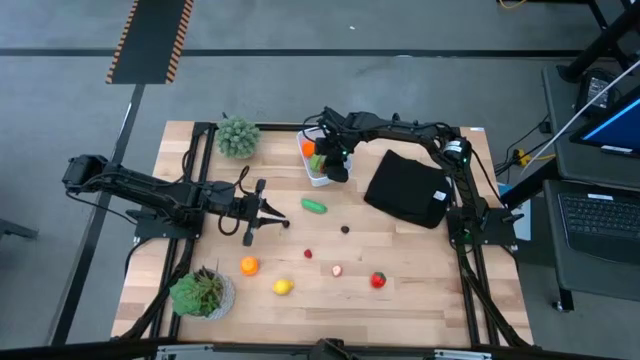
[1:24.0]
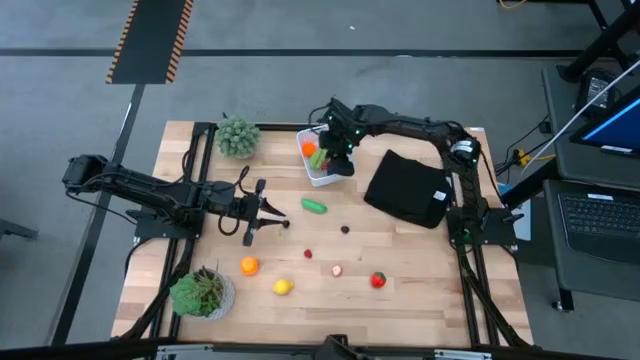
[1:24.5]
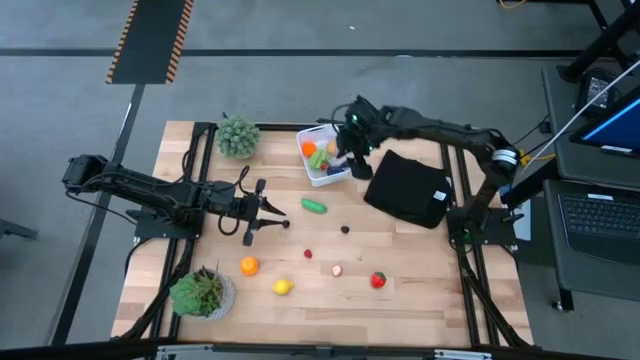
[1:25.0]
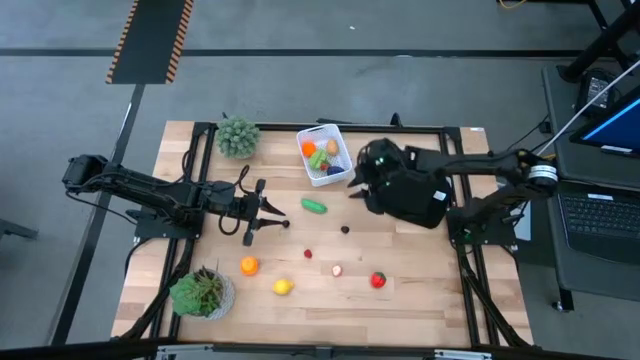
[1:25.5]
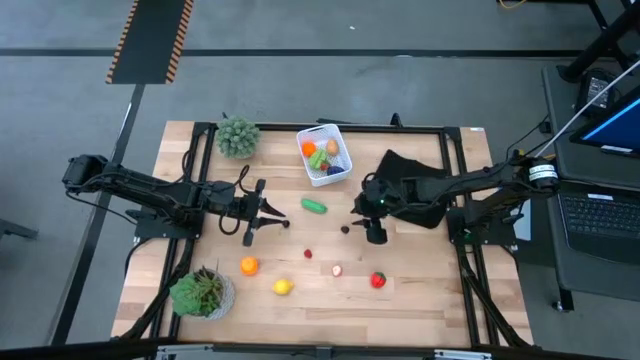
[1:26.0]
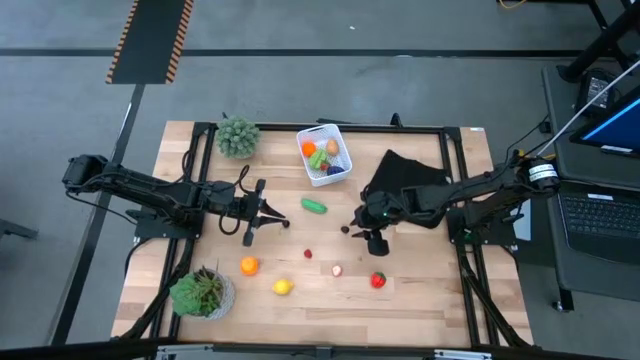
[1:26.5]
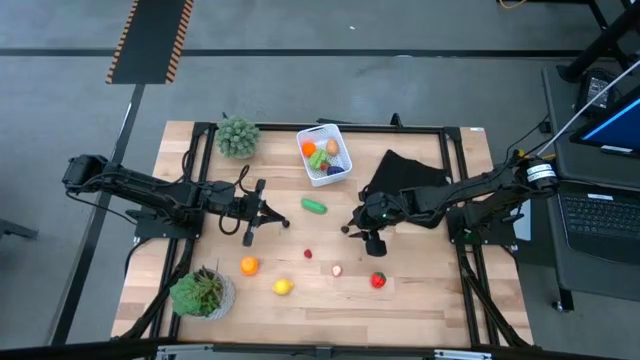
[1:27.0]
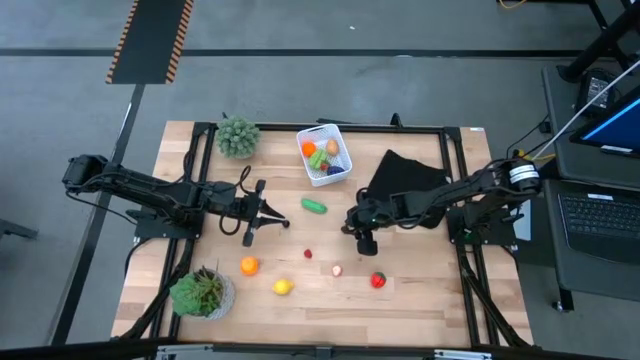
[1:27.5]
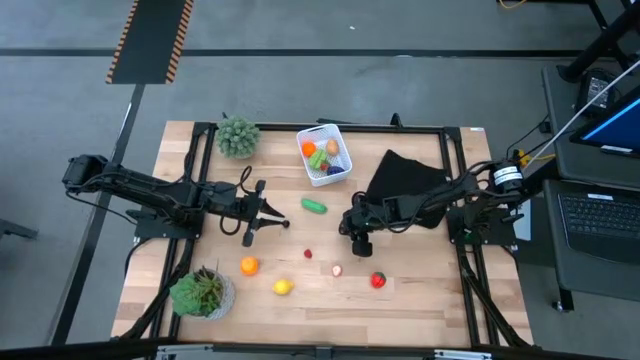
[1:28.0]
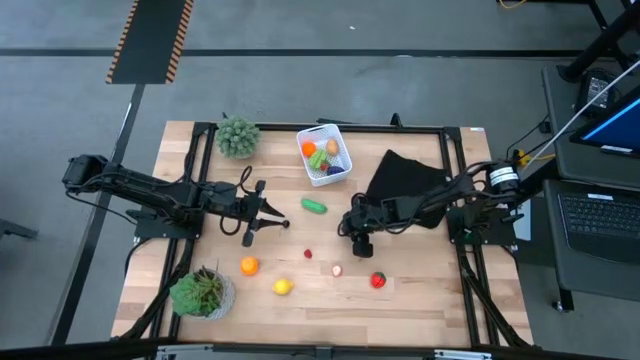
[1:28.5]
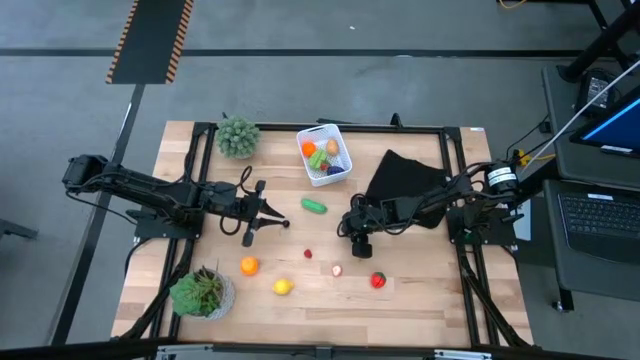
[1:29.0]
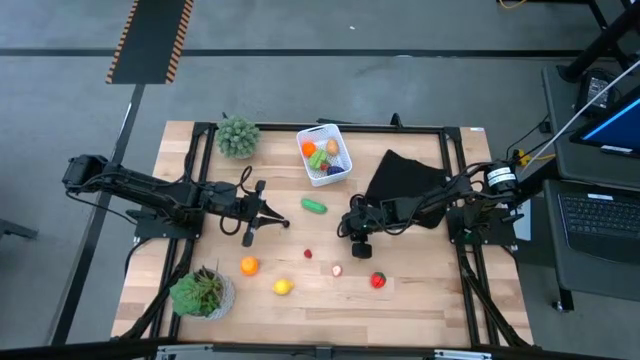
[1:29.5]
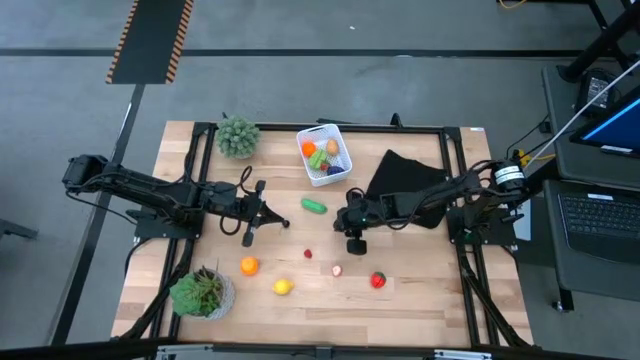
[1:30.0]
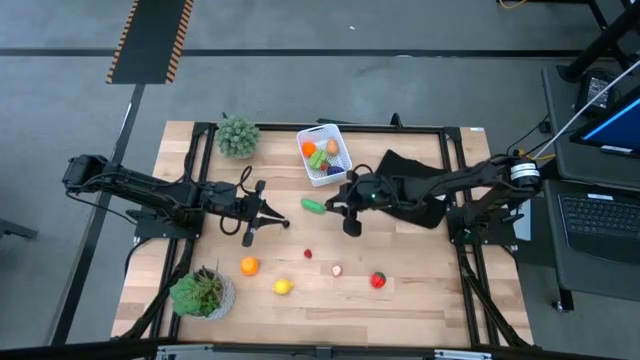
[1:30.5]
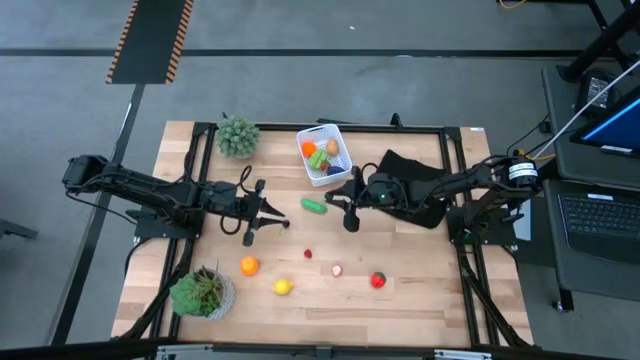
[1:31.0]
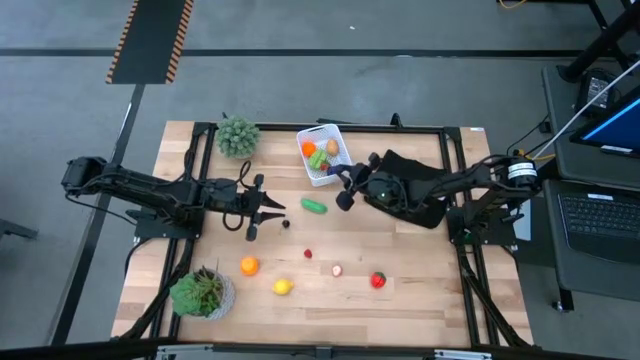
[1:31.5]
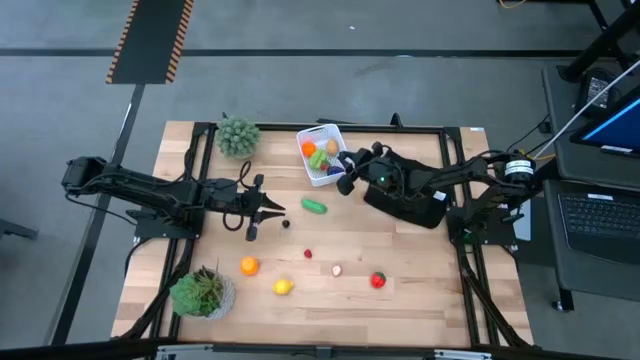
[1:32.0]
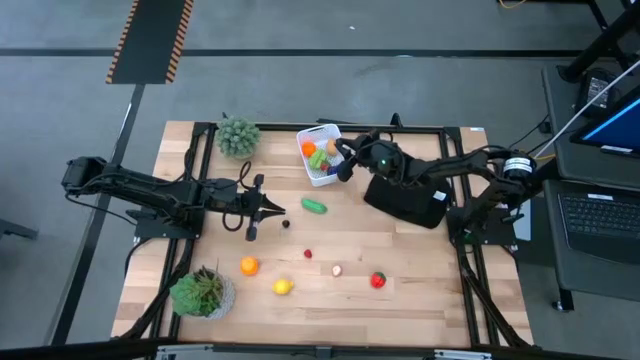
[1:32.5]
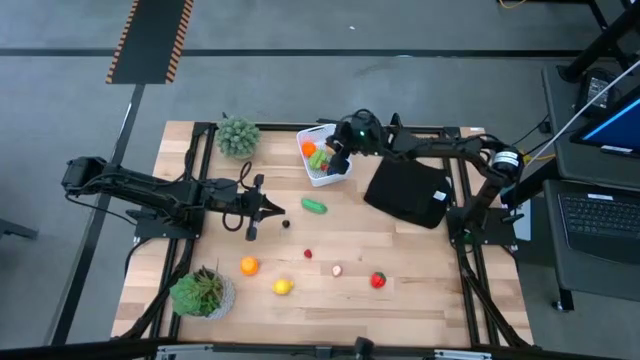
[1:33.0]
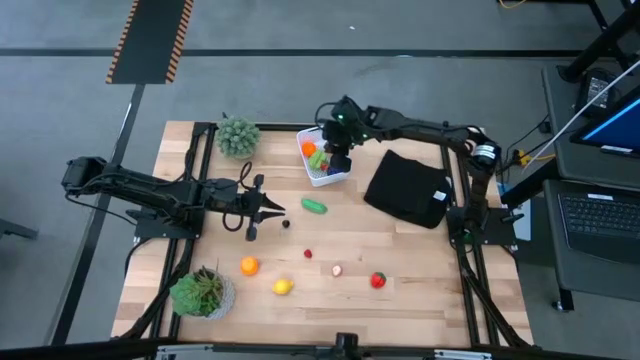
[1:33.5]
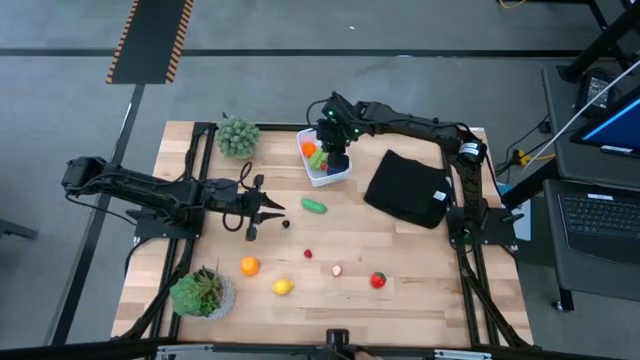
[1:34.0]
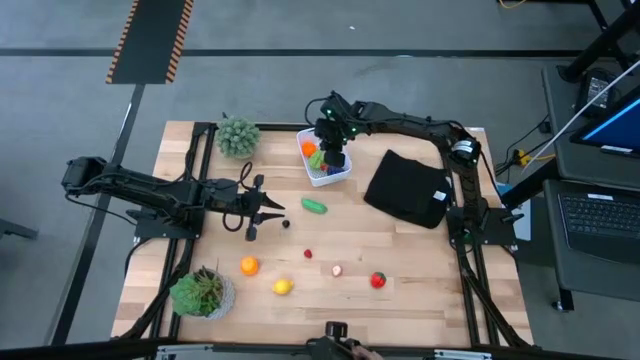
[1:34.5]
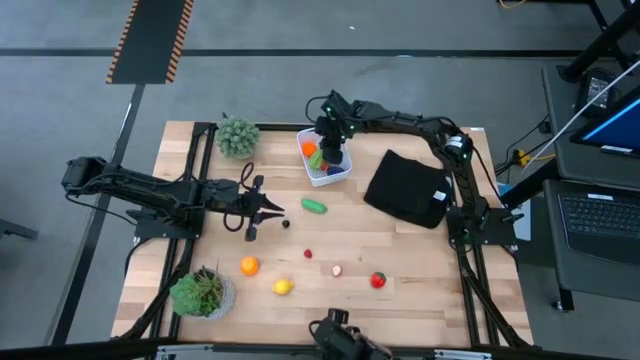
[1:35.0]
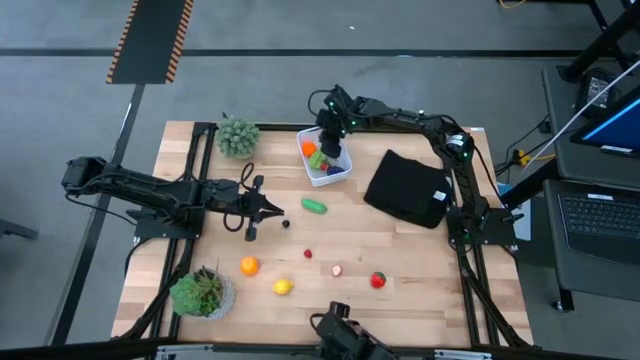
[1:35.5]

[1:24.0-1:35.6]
Task: Pick and placing Produce into tupperware
Put the blackberry into the basket

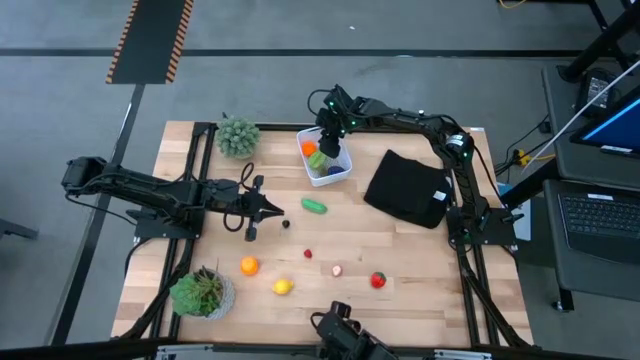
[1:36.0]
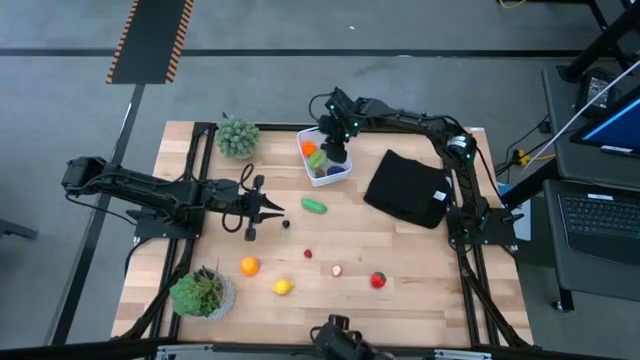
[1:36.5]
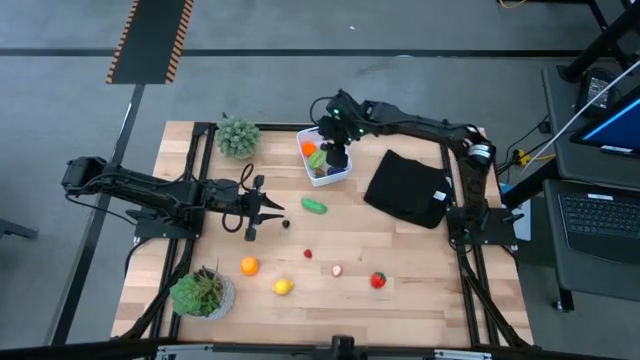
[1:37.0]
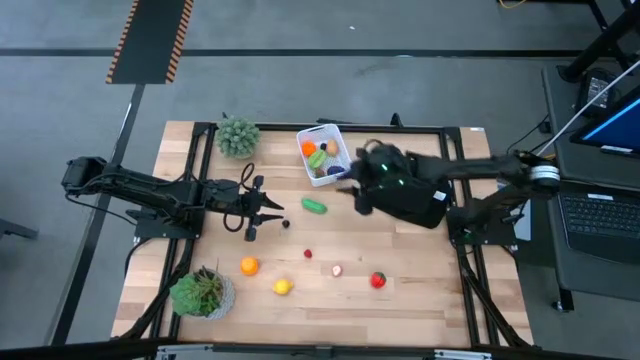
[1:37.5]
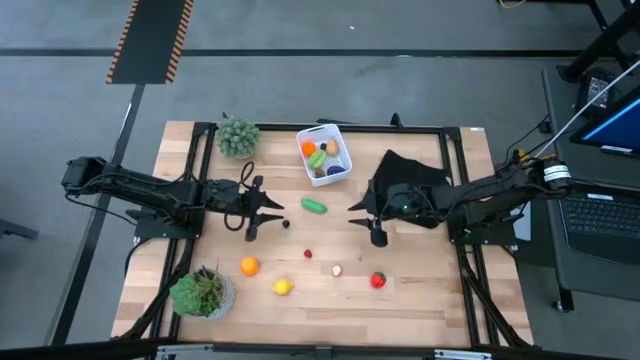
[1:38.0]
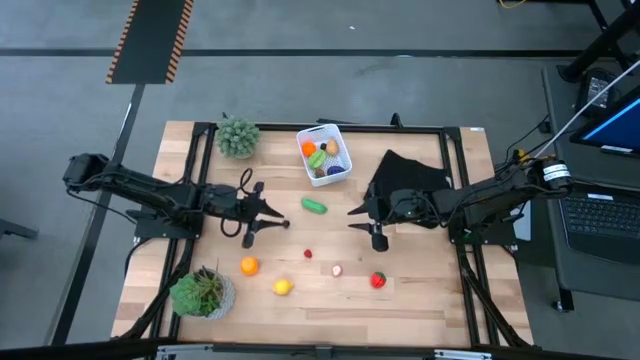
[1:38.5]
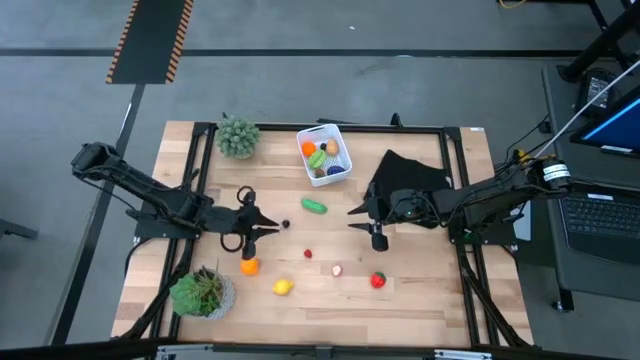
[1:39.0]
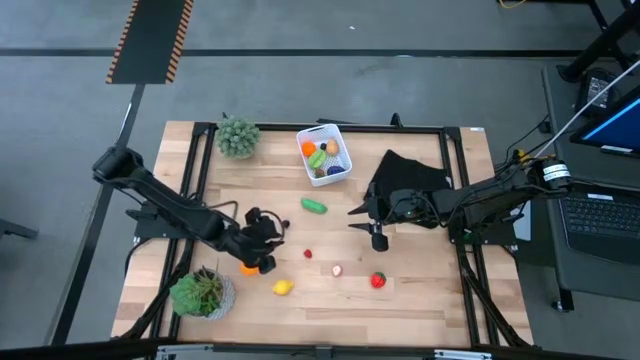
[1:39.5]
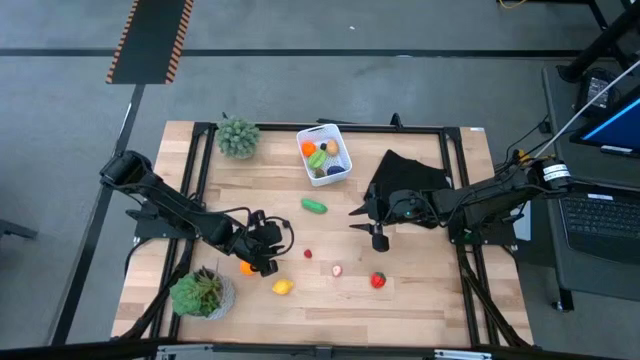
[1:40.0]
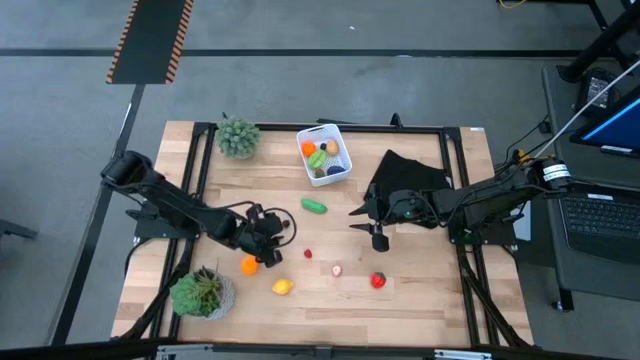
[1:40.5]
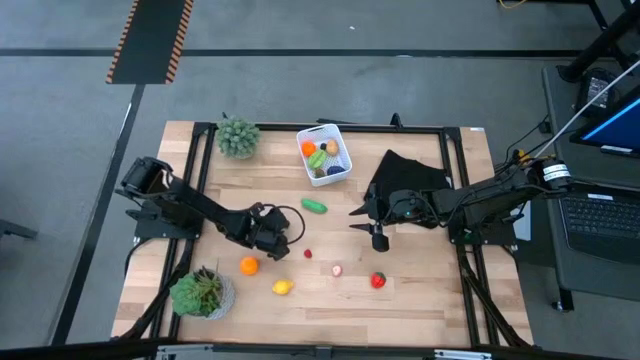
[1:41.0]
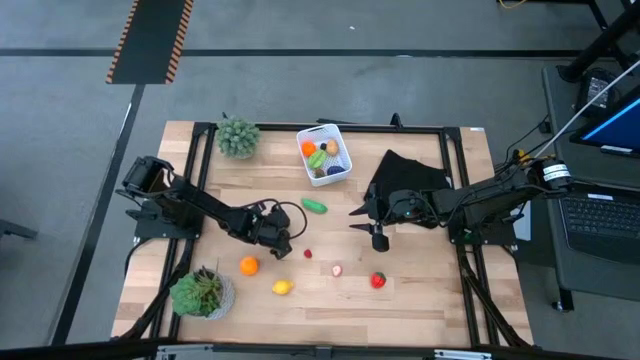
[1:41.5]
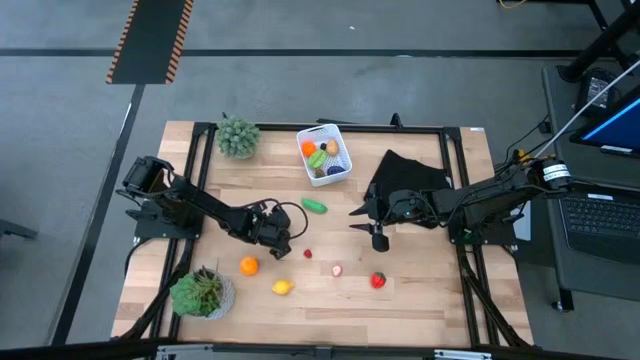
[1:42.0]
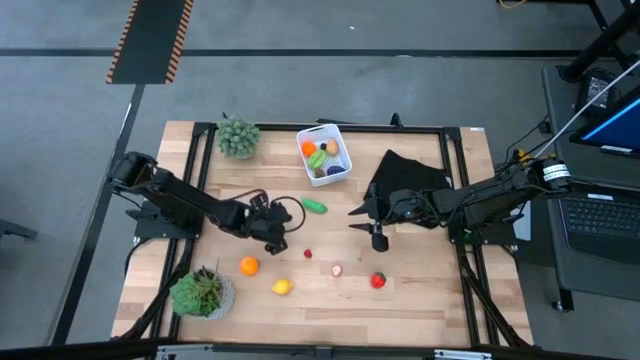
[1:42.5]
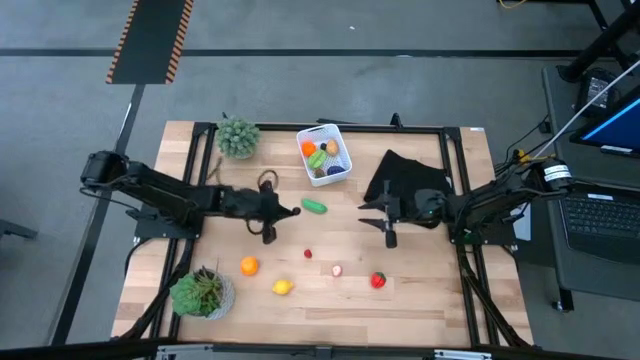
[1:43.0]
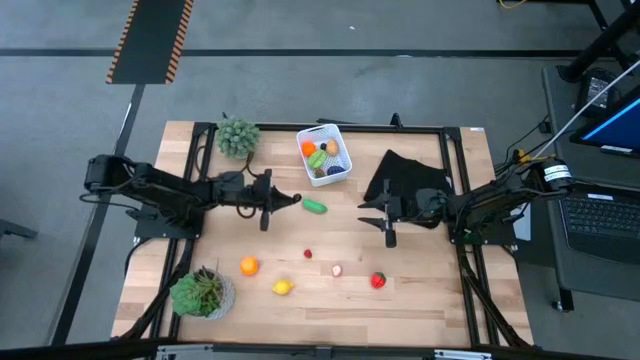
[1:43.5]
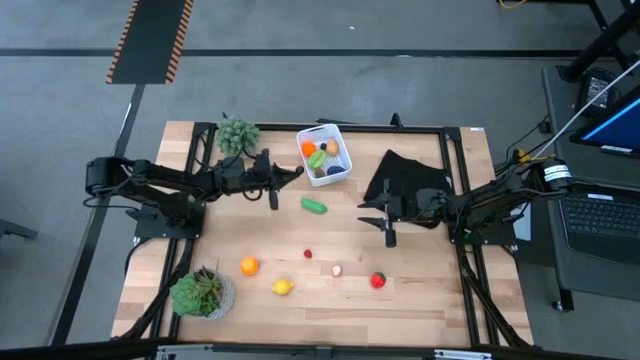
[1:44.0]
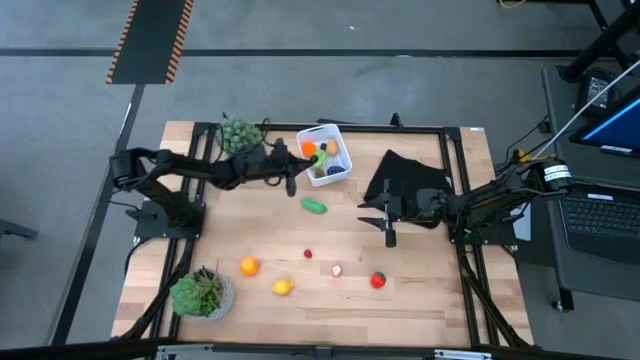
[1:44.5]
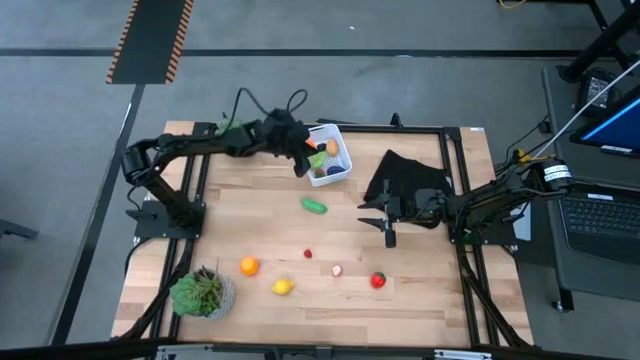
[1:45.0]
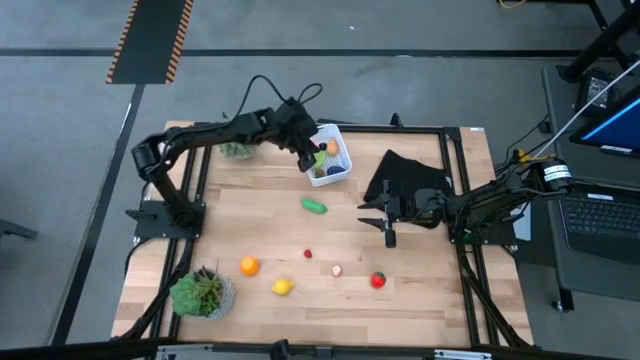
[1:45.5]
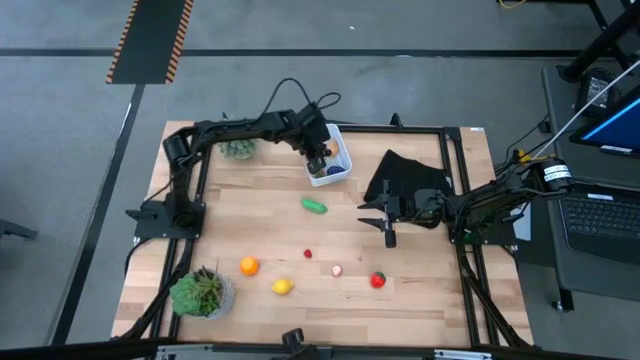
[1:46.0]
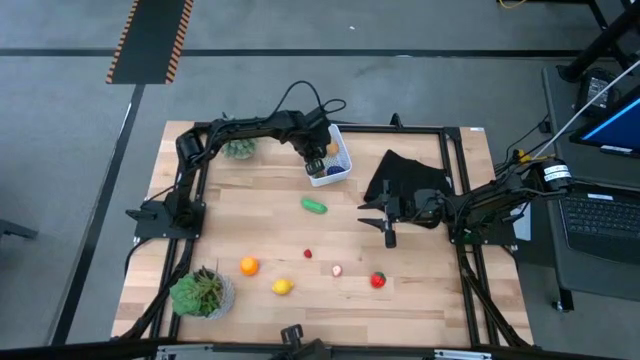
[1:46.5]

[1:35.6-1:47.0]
Put the cherry into the basket
